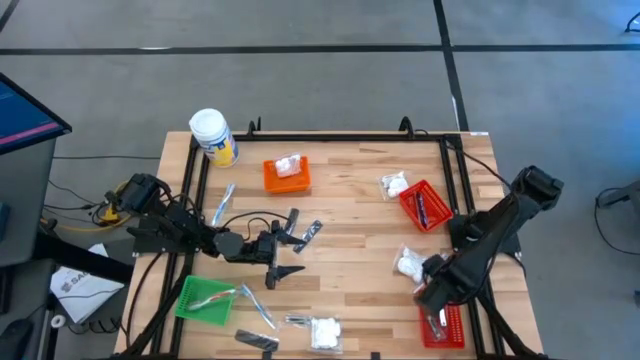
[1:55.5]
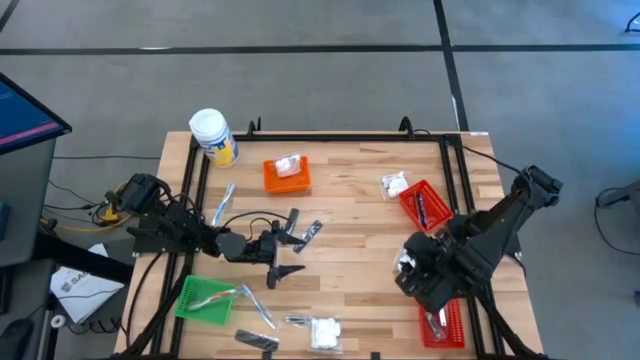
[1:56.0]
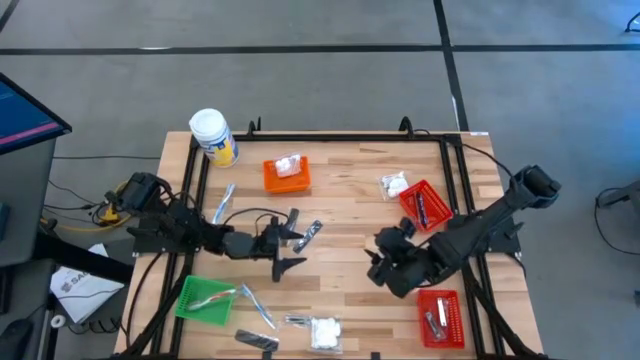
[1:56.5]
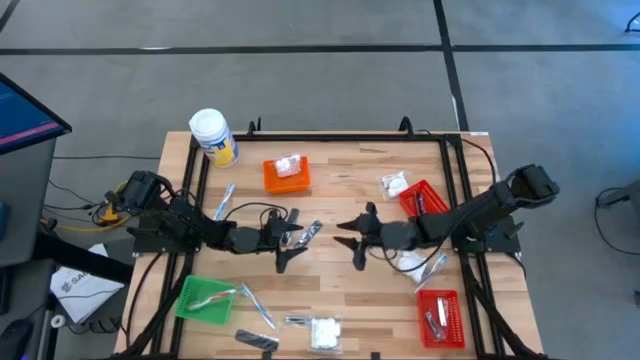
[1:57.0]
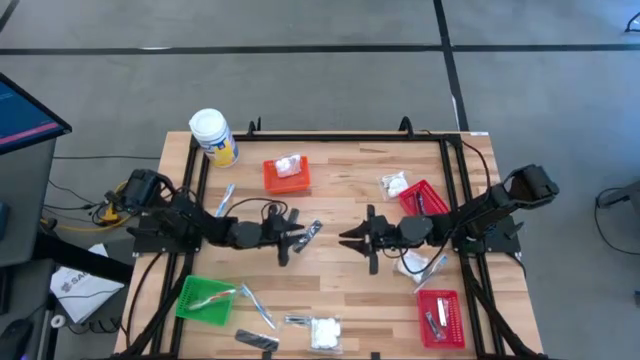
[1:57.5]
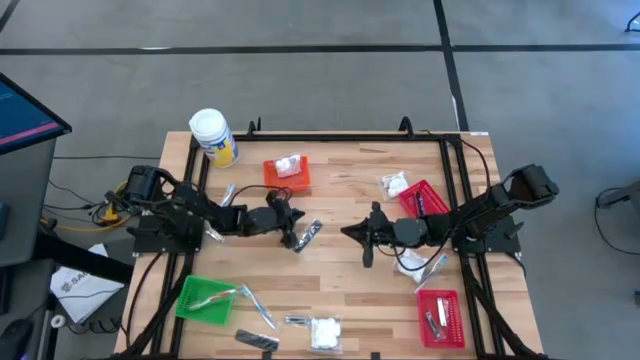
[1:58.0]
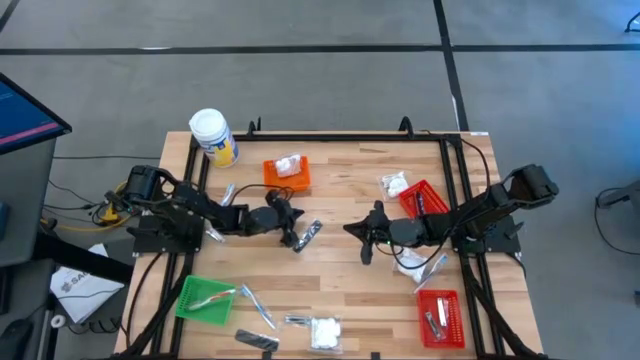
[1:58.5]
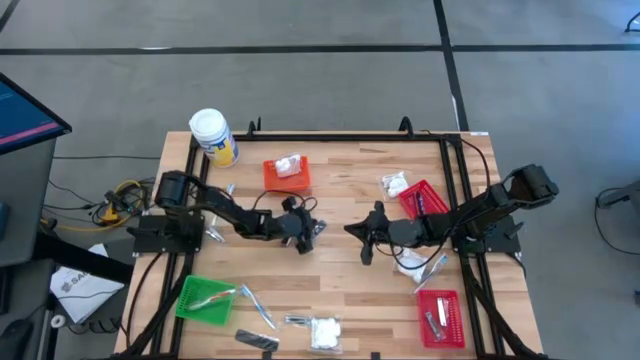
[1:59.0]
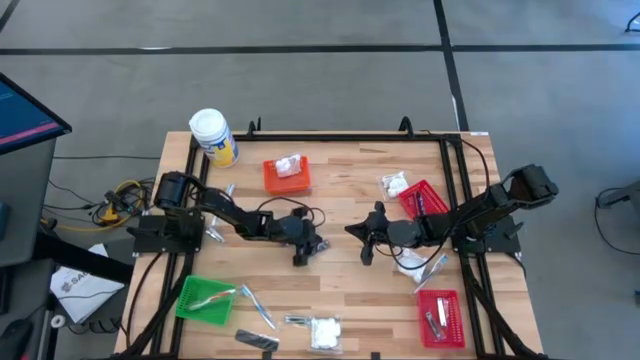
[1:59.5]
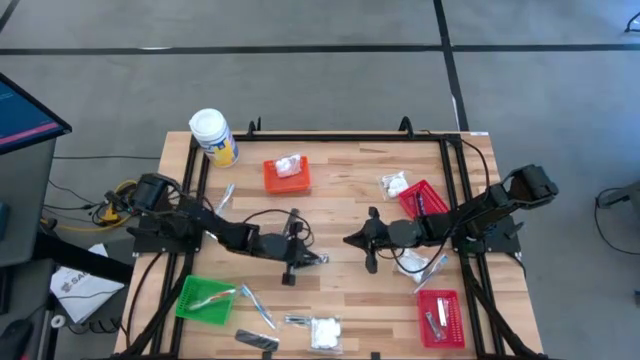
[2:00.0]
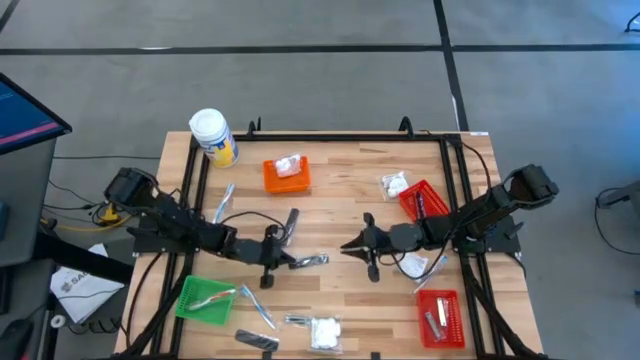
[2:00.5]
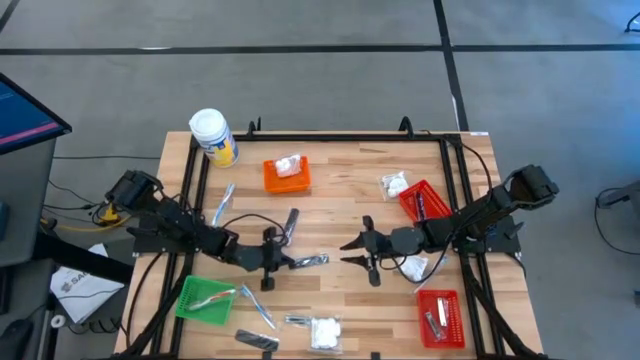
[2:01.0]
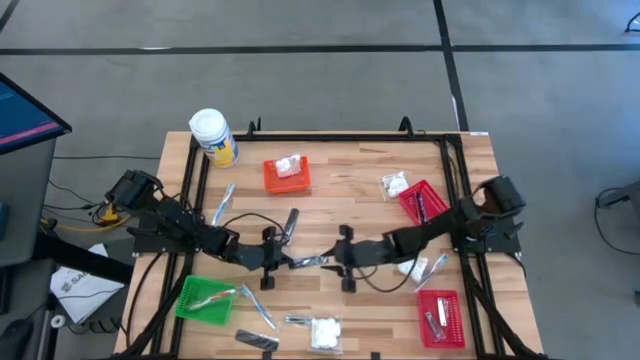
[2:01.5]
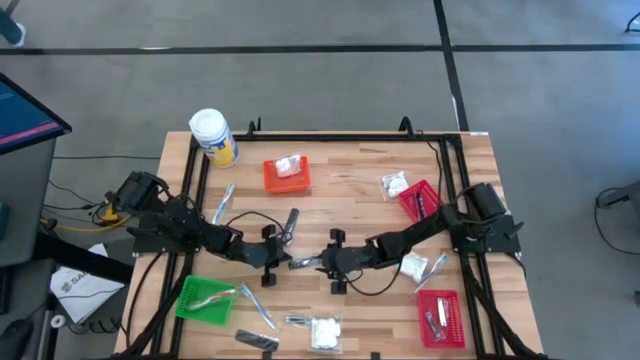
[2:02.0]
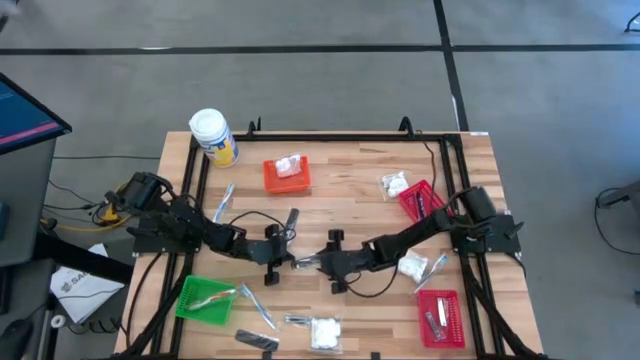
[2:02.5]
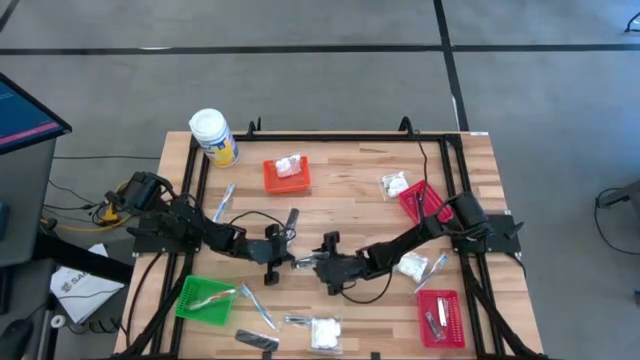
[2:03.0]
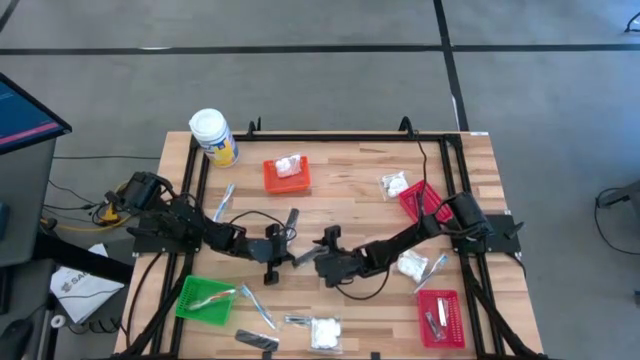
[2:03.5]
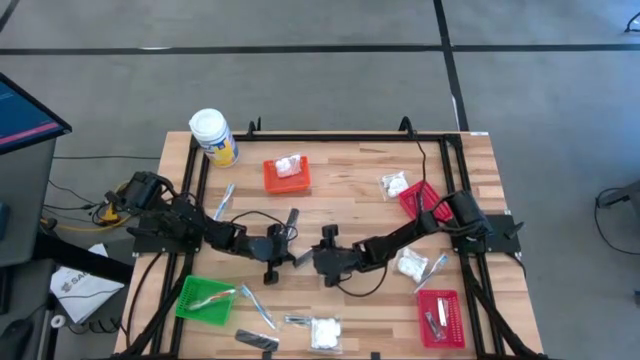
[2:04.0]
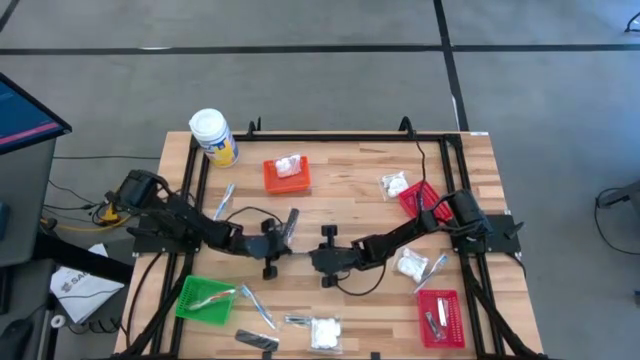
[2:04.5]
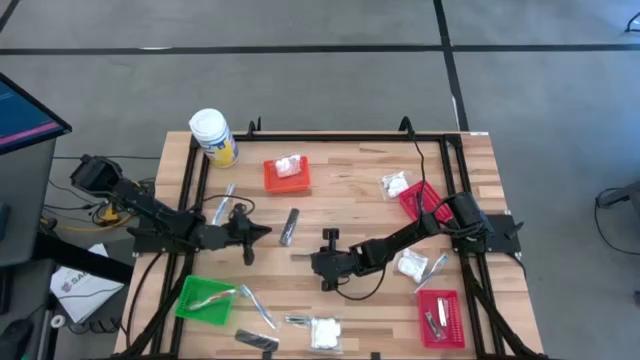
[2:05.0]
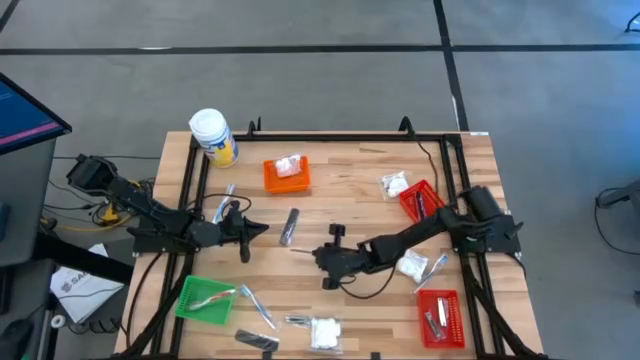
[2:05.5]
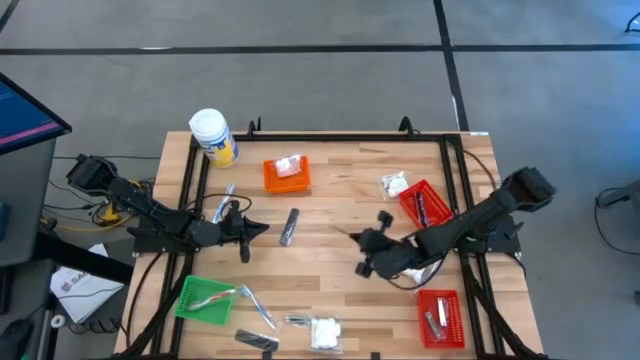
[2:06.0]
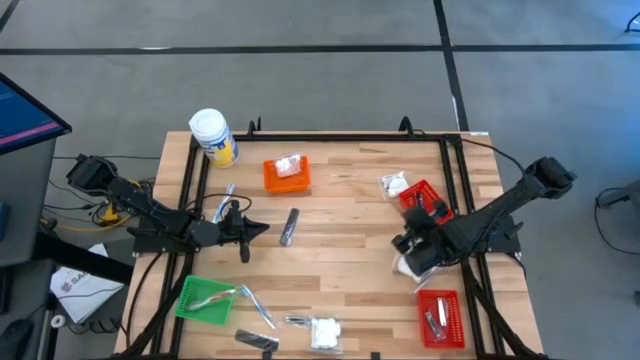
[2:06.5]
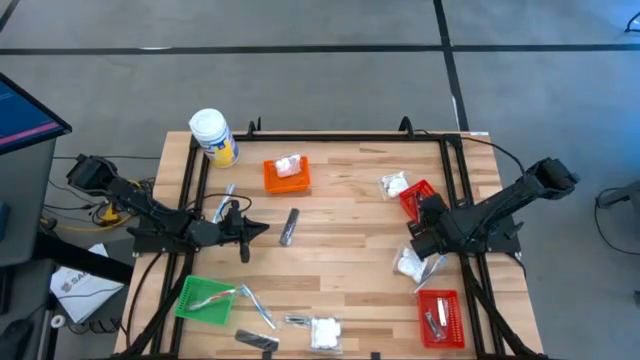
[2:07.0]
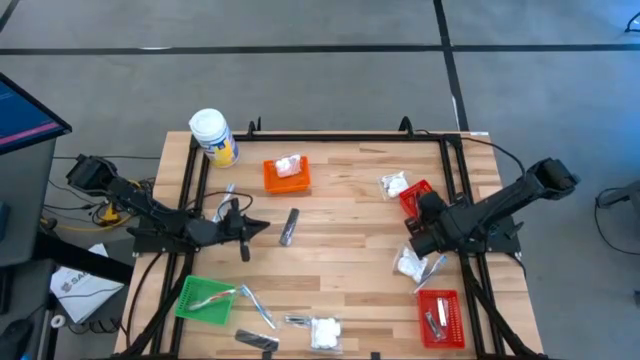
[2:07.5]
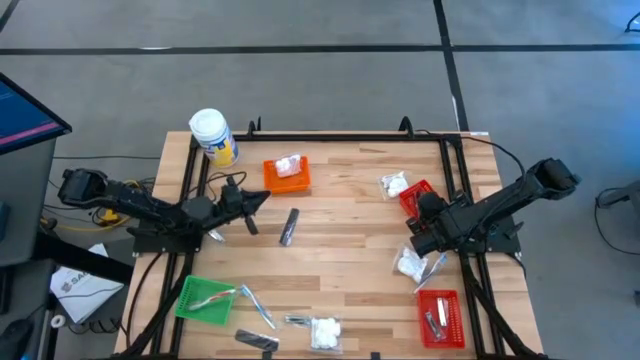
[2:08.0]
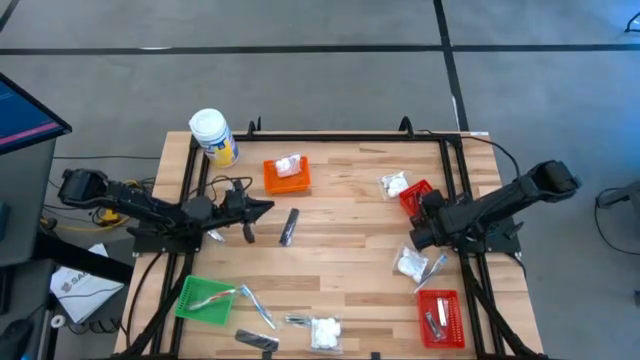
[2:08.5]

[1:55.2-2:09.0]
Task: Pick & Place Travel size toiletries
Put the black comb into the top red basket

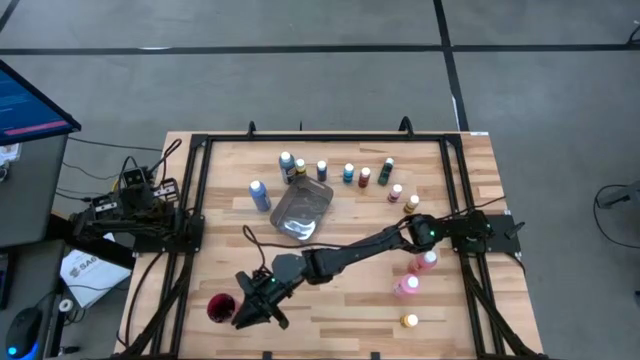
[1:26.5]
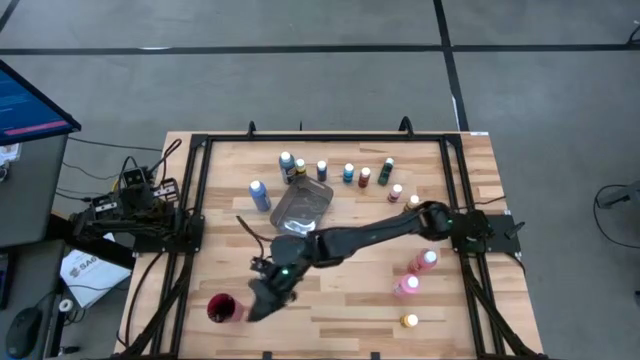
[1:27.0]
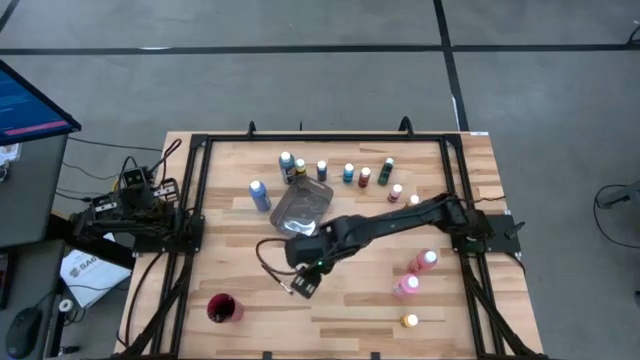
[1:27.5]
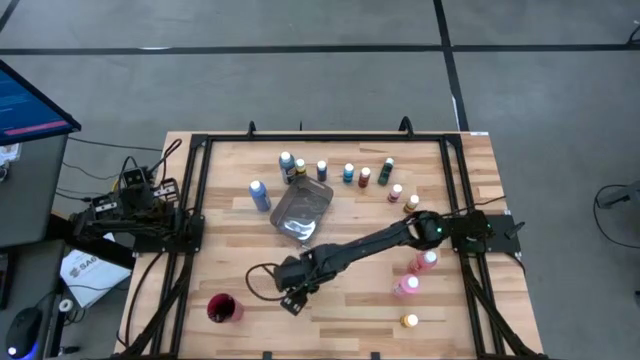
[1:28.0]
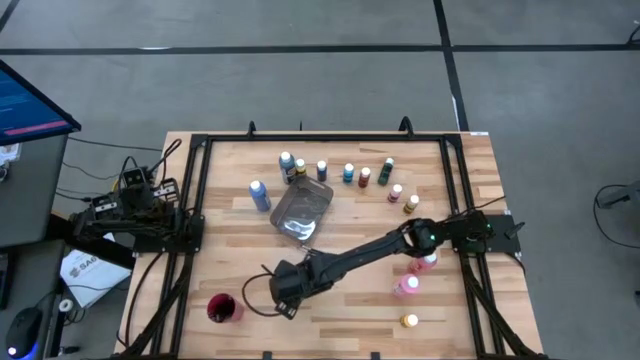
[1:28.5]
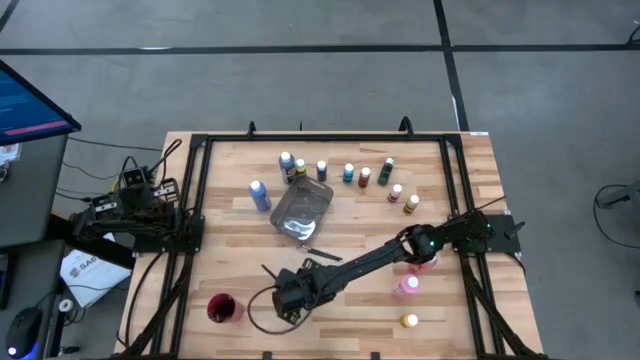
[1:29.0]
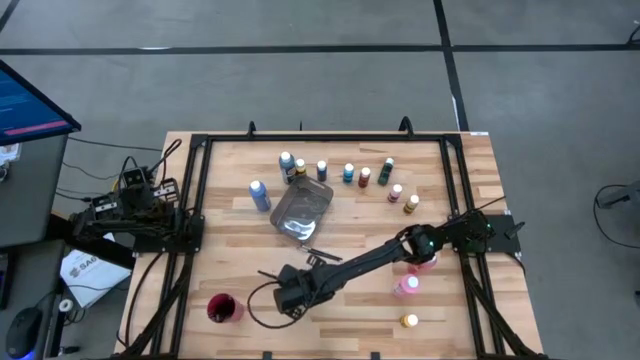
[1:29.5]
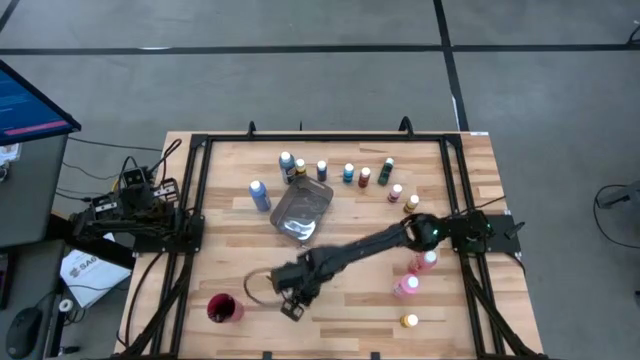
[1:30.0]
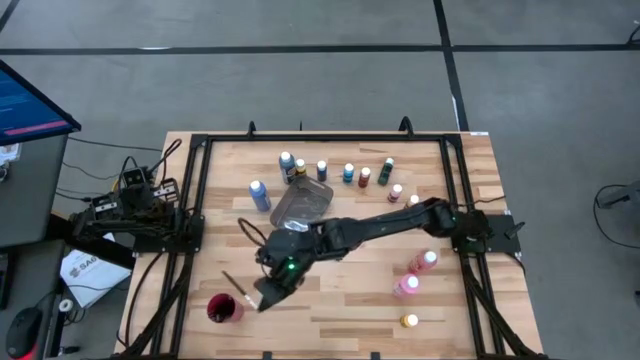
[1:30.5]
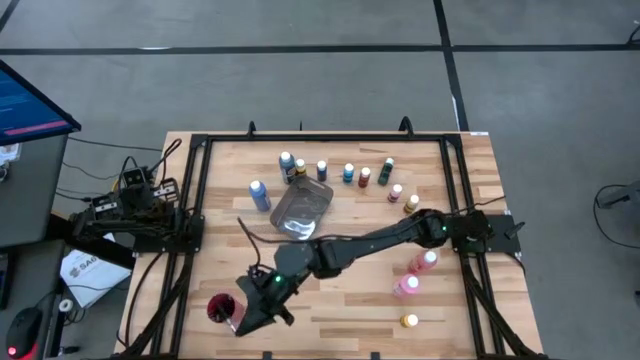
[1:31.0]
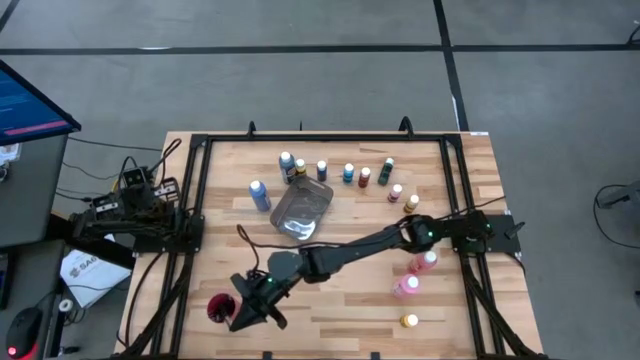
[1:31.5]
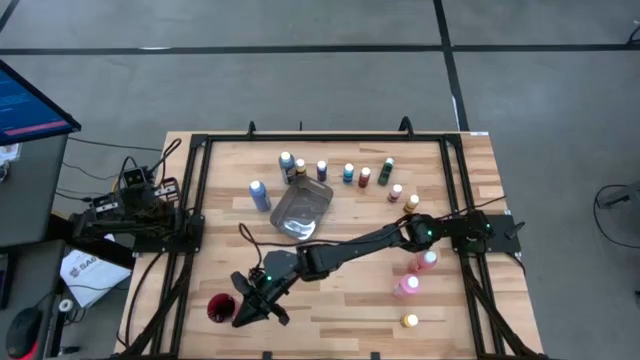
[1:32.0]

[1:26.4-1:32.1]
Task: Pick & Place Paint Supplies
Put the silver paintbrush into the red cup

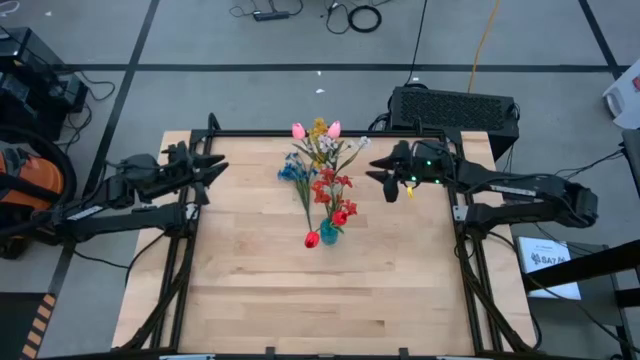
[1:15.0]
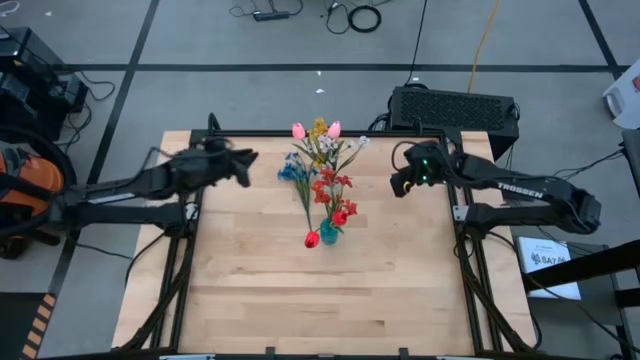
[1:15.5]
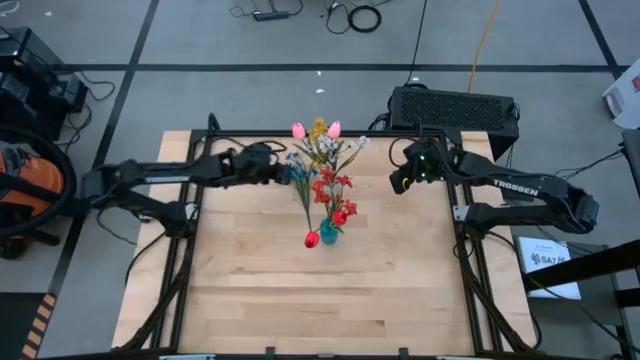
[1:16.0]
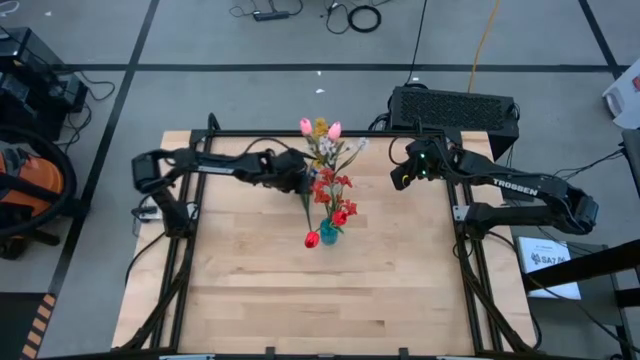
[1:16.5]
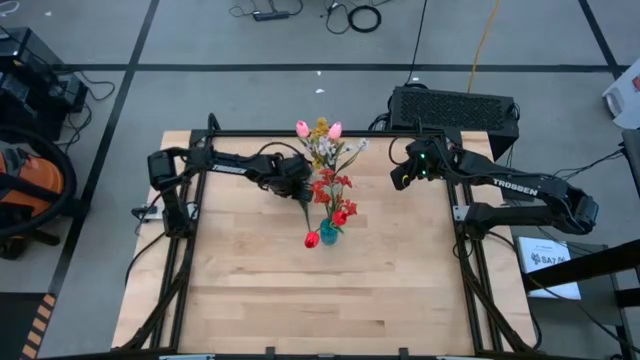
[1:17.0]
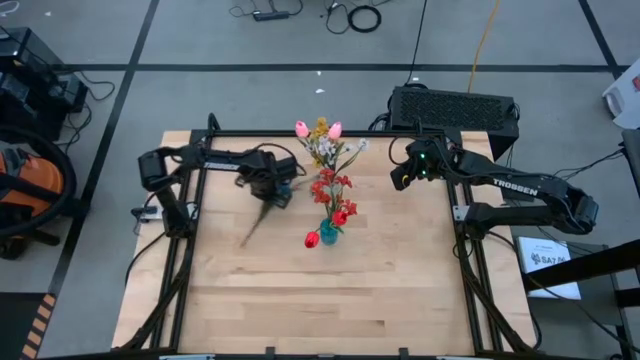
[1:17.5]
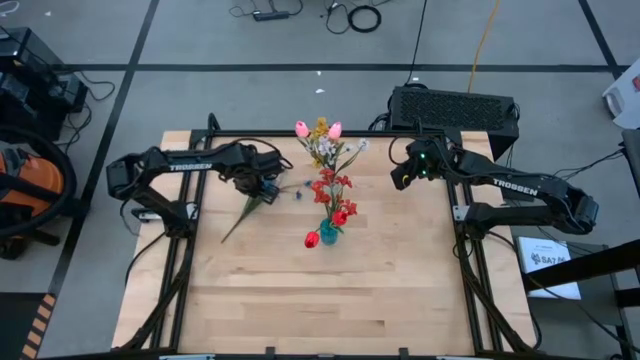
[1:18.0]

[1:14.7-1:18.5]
Task: Sort flowers into vase by color
Put the blue flowers into the blue vase
